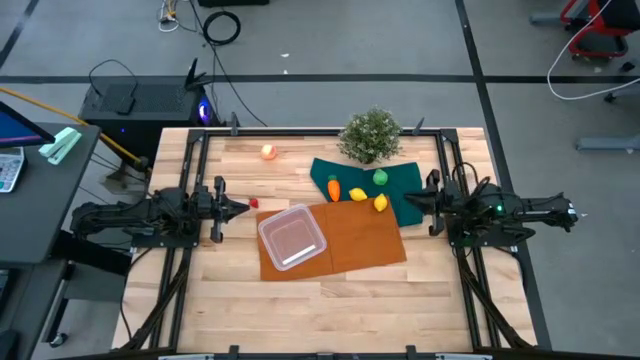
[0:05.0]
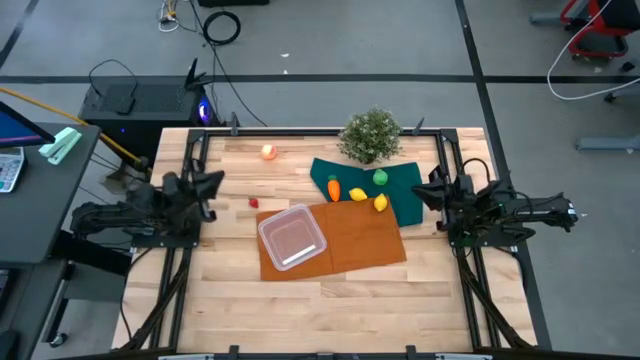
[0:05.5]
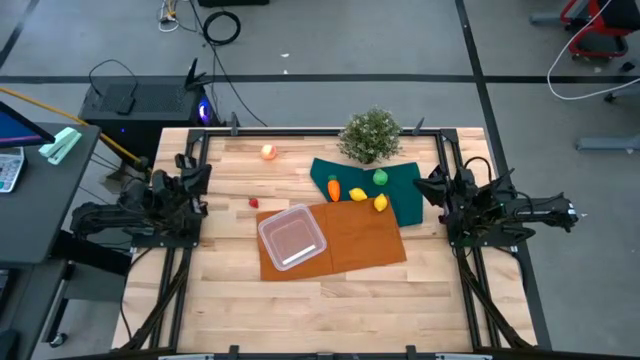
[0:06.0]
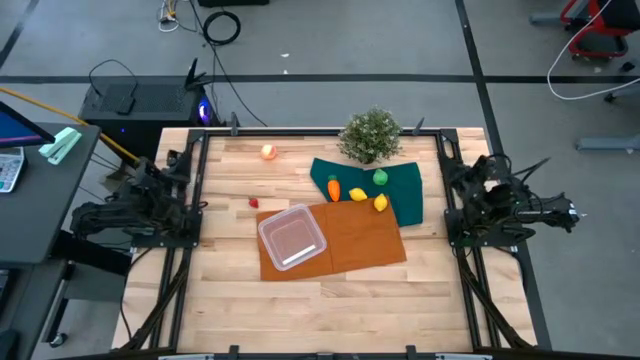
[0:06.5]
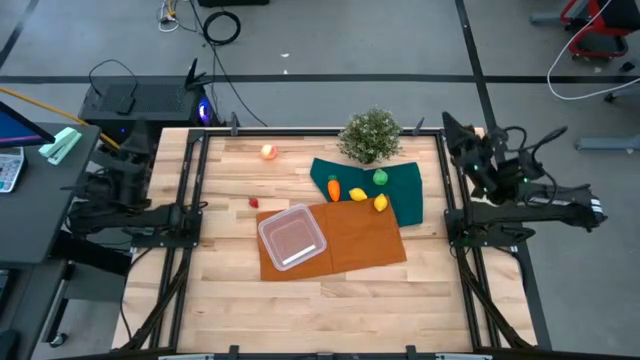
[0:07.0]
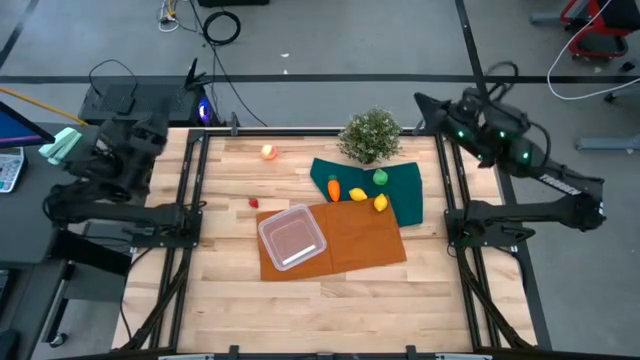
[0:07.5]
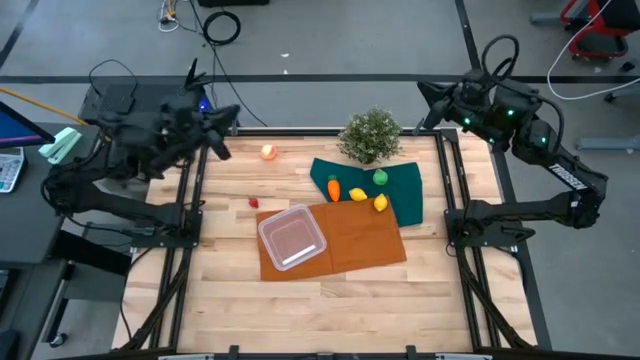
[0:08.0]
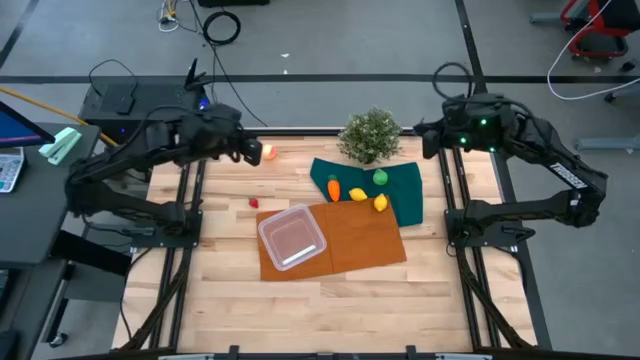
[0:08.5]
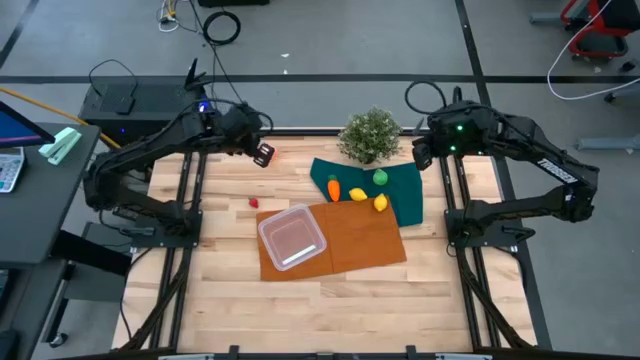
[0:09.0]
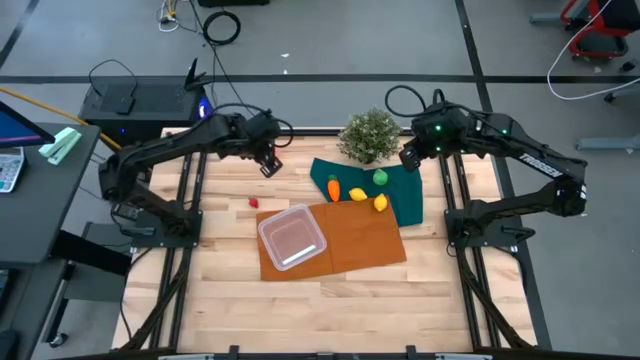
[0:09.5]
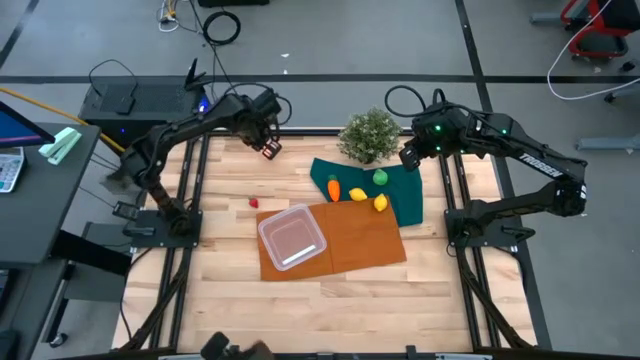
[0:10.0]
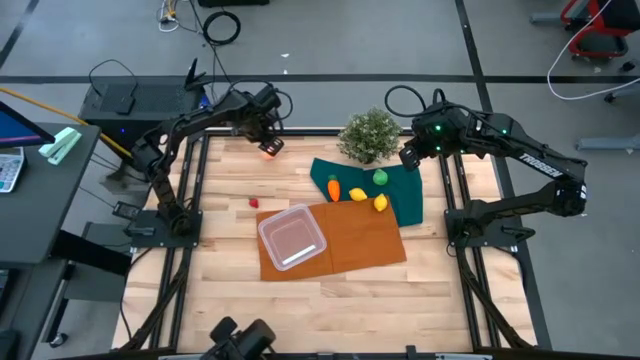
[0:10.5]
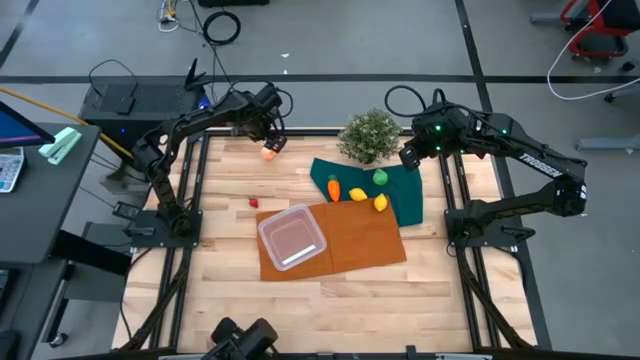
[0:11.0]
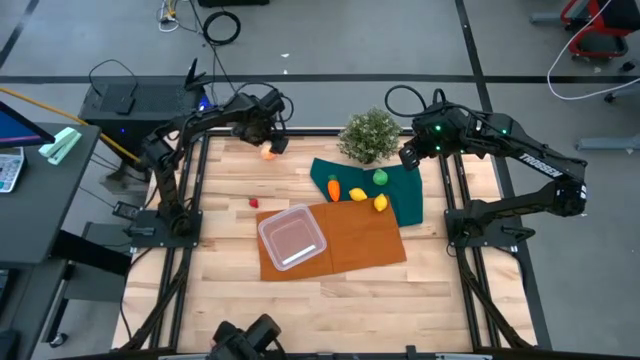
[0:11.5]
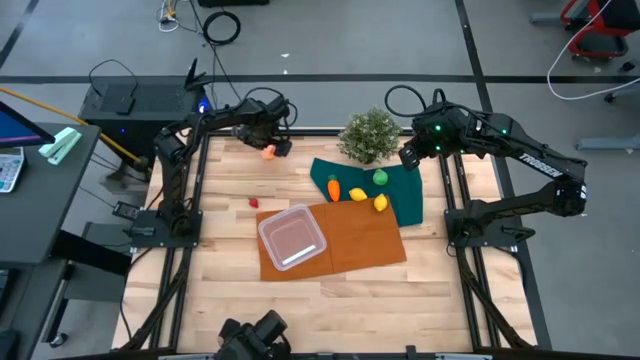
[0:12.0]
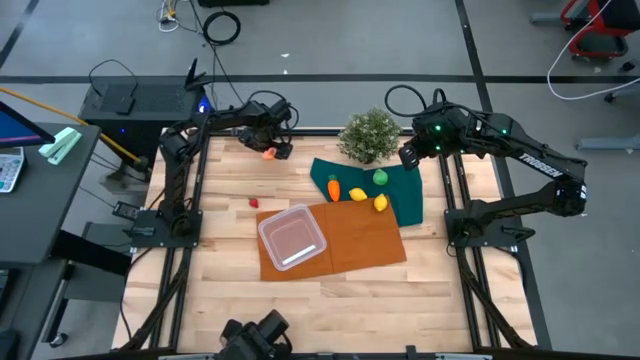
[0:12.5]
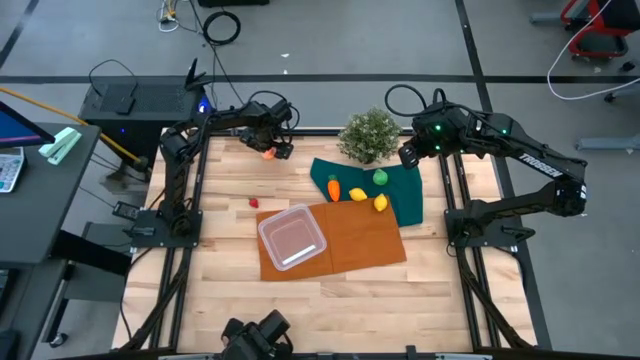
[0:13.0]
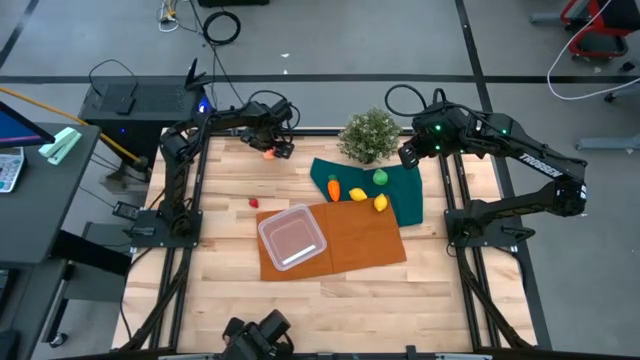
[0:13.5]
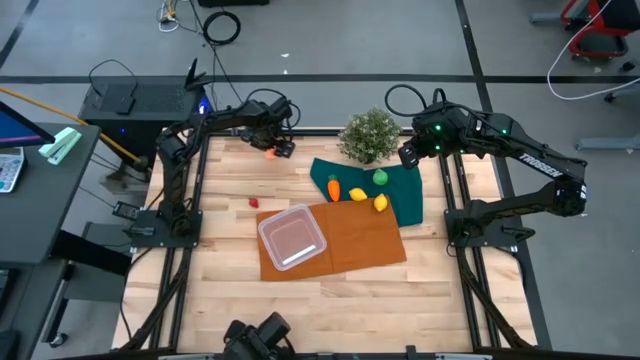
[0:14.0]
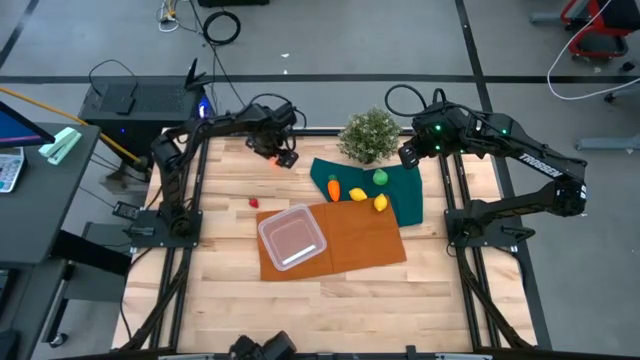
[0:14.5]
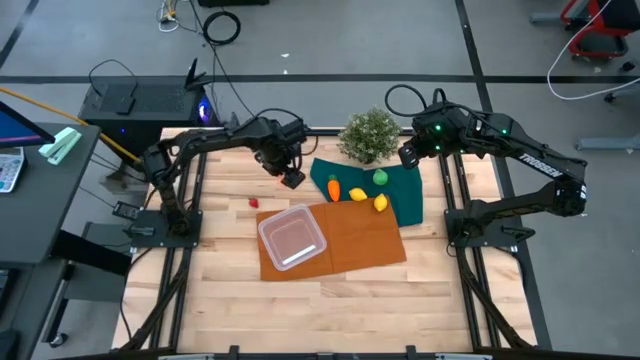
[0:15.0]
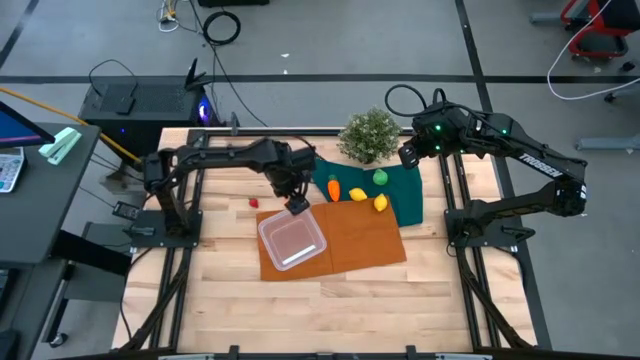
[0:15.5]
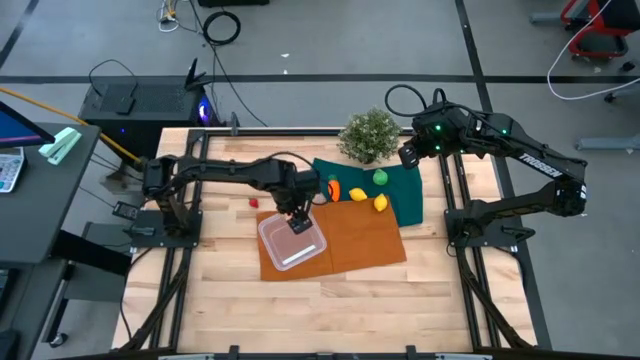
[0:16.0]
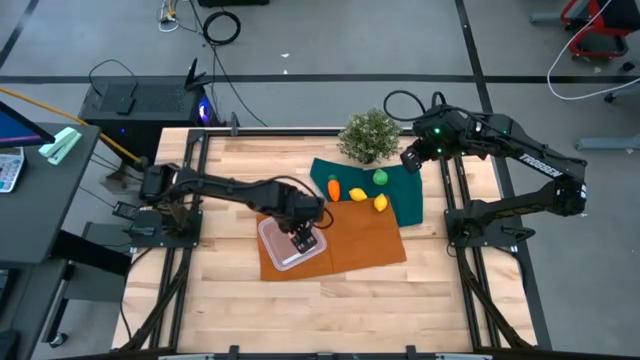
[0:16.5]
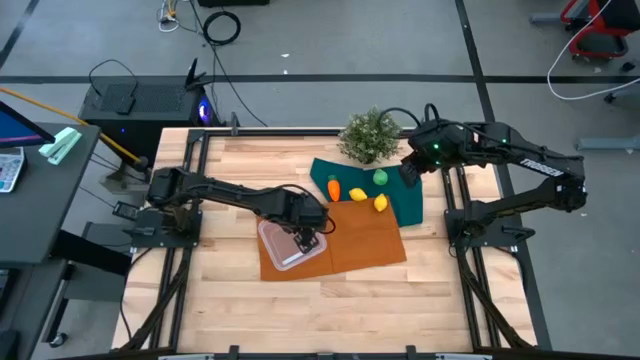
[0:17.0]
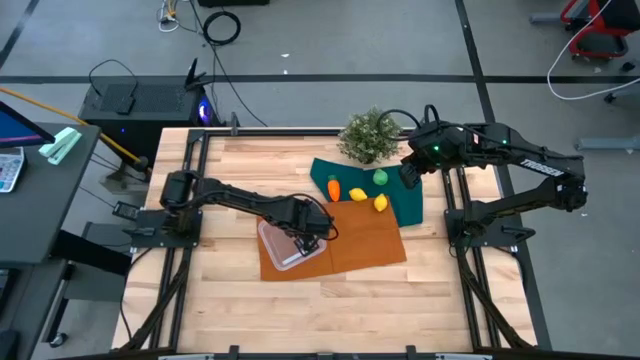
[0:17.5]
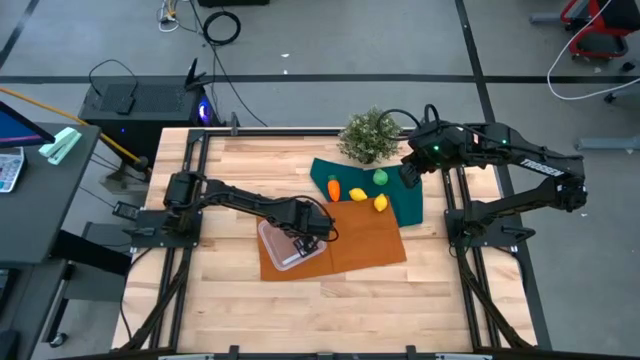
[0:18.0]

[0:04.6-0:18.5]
Task: Pick and placing Produce into tupperware
Put the pink peach into the transparent bin

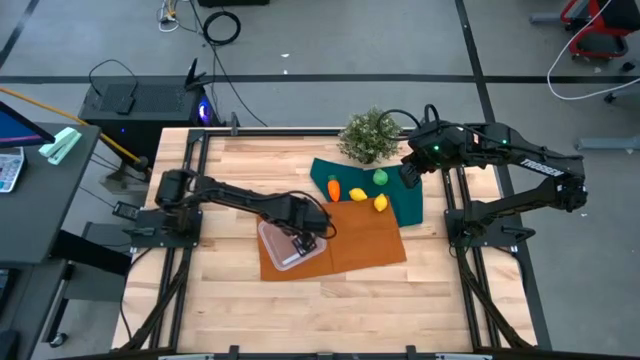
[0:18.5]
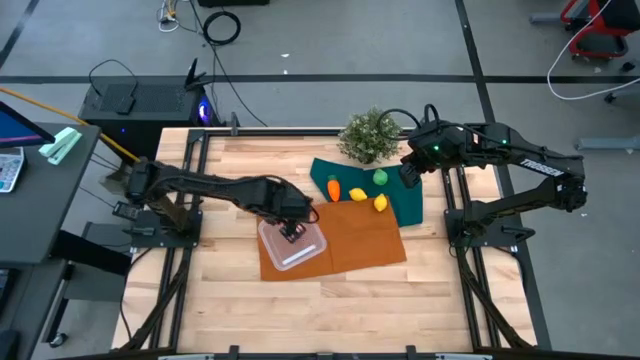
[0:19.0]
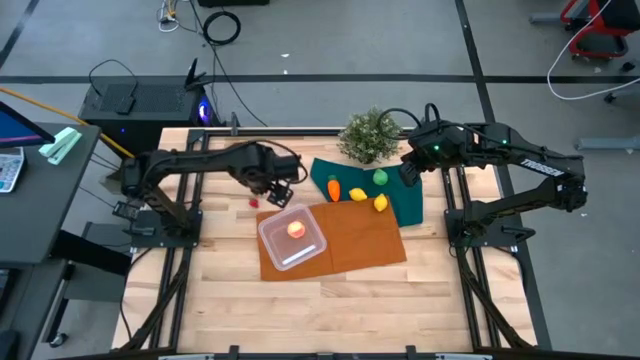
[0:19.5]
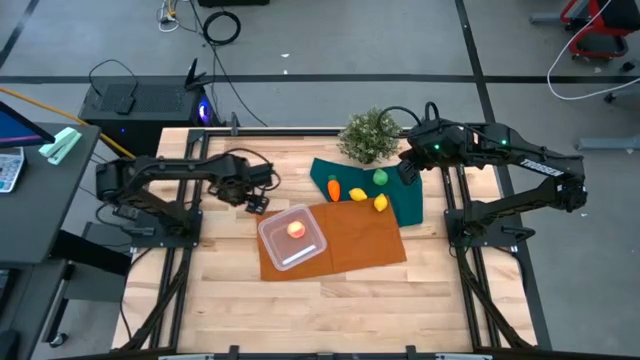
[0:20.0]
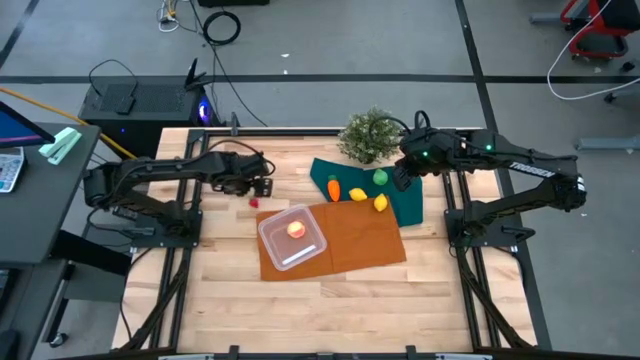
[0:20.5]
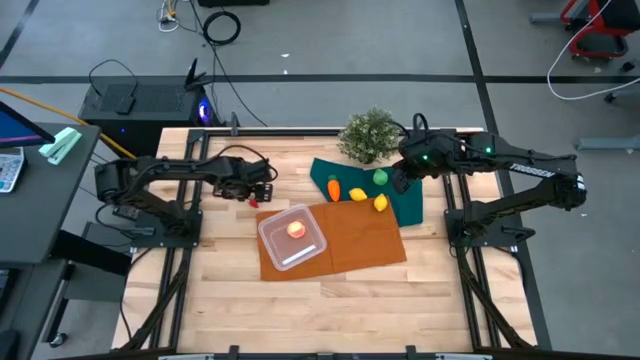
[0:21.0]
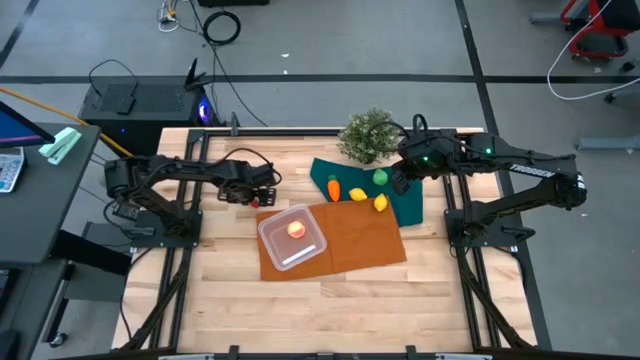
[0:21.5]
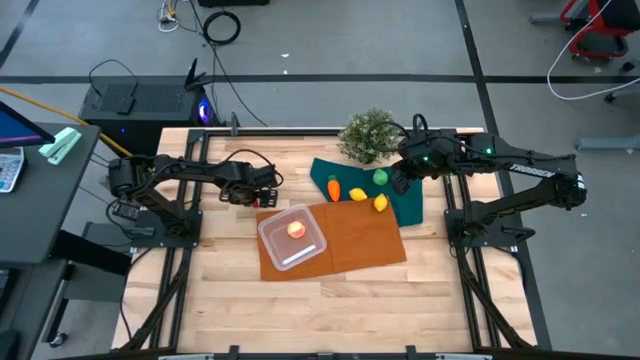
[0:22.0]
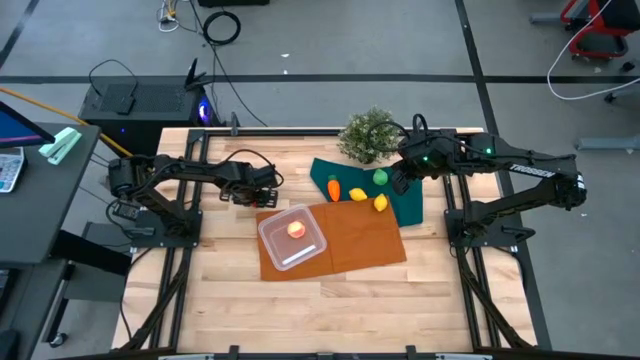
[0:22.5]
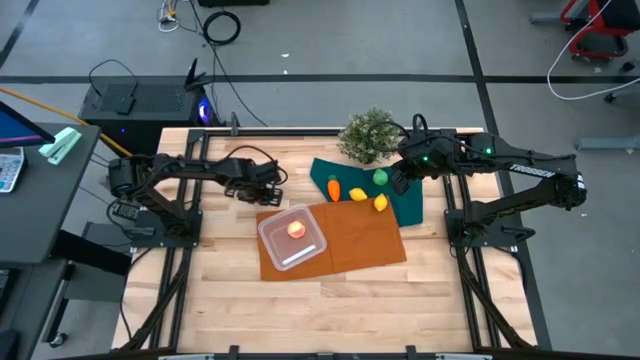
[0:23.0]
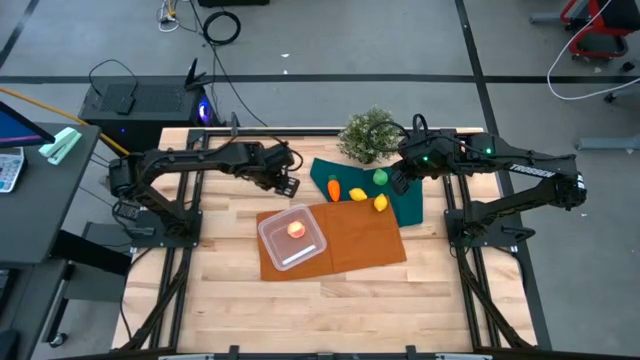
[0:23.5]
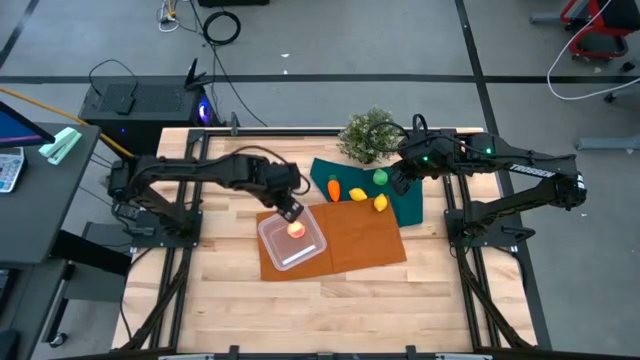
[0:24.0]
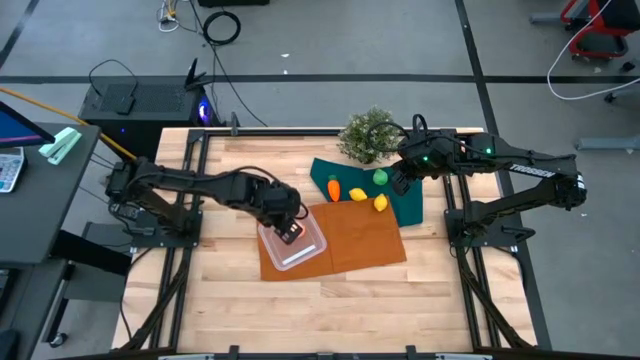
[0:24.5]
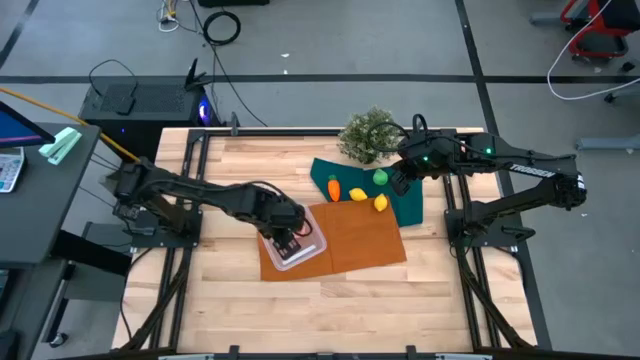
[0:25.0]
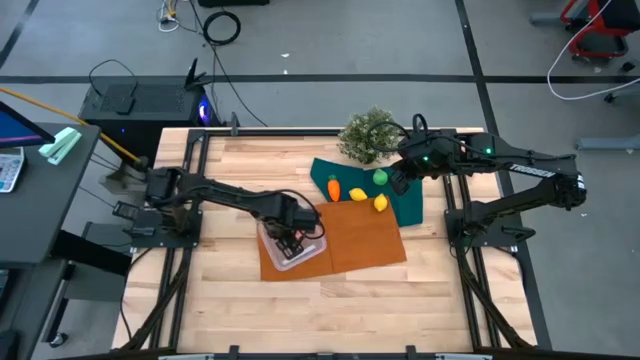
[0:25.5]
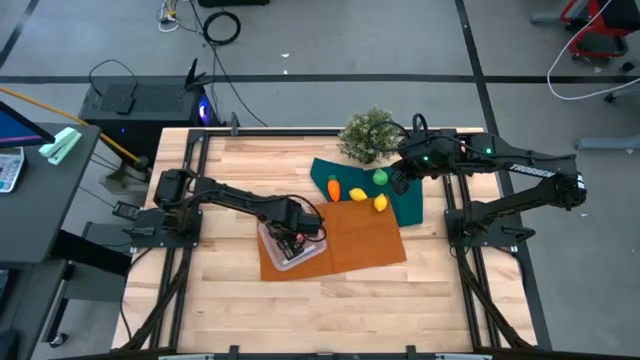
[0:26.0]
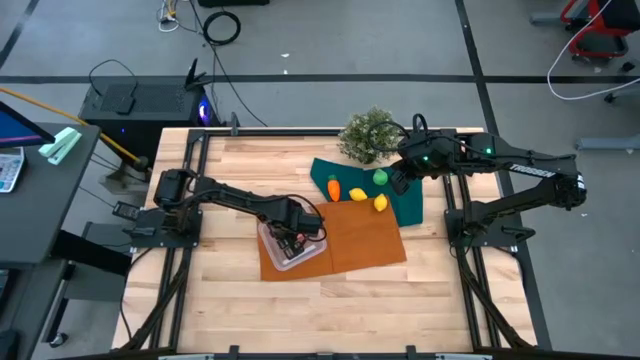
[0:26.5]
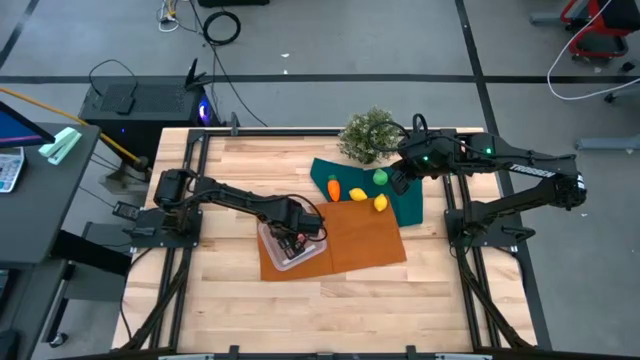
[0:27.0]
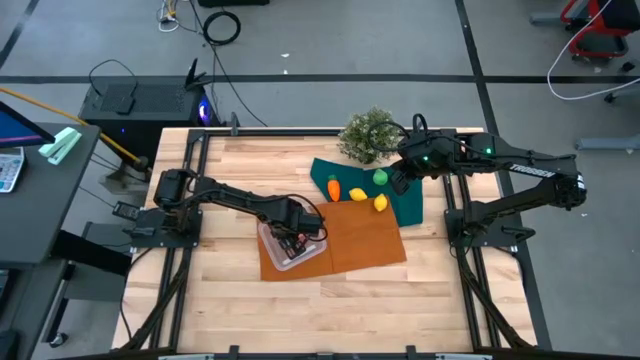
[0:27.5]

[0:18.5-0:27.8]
Put the red strawberry into the transparent bin
